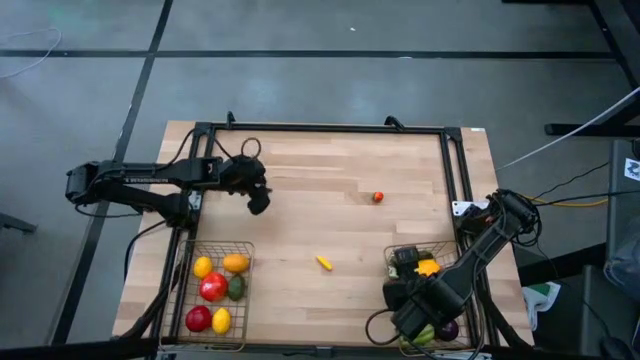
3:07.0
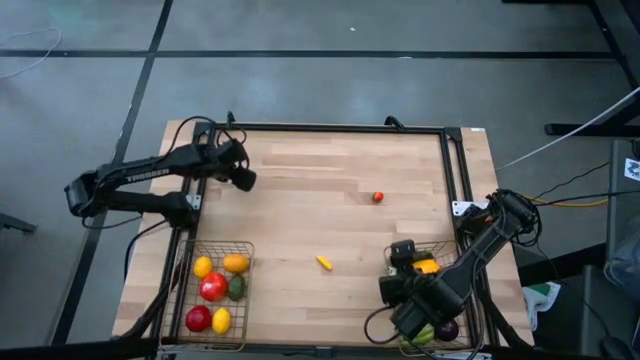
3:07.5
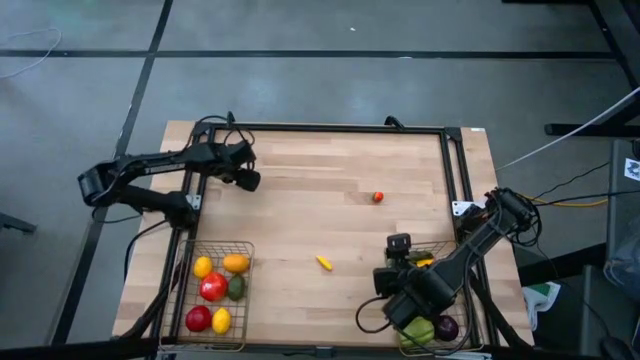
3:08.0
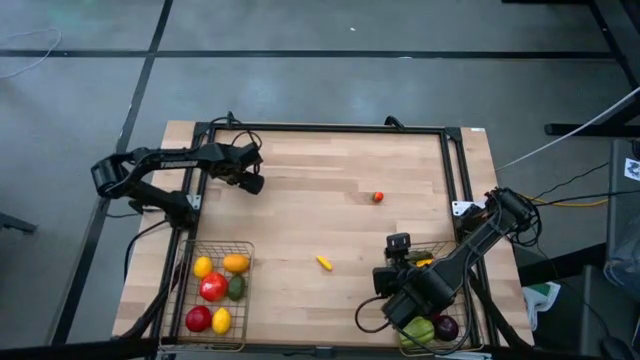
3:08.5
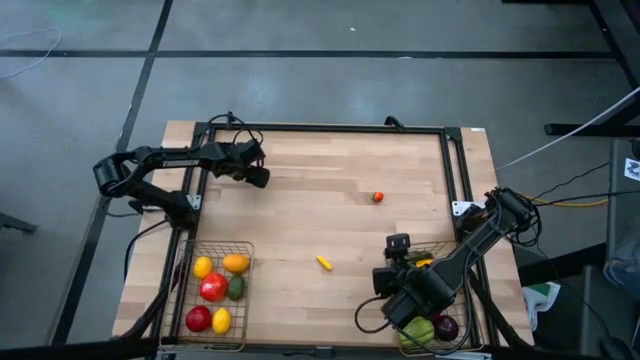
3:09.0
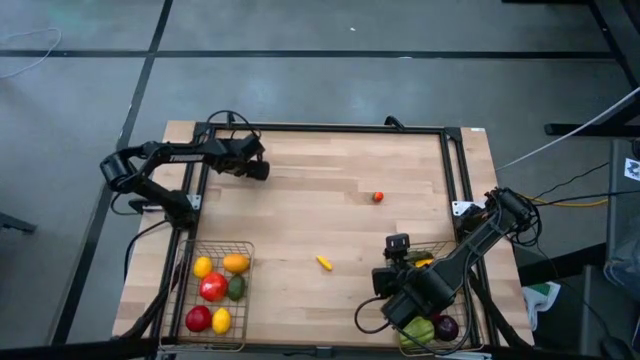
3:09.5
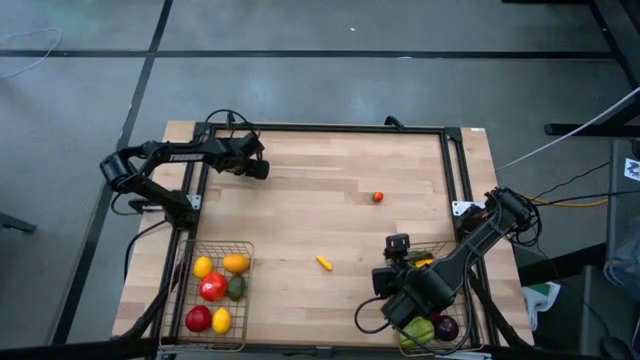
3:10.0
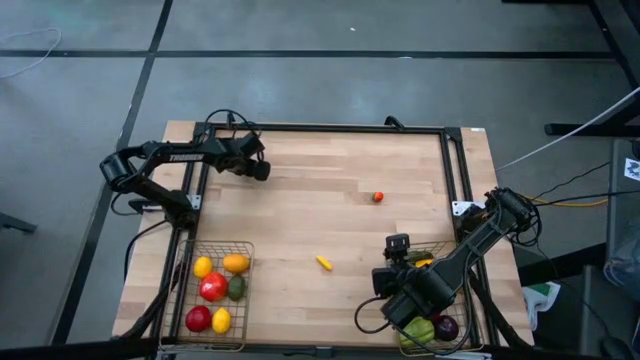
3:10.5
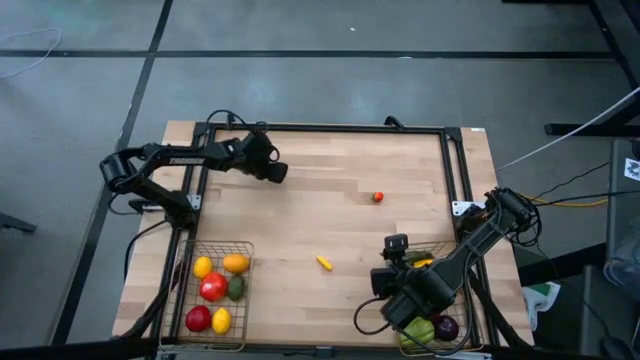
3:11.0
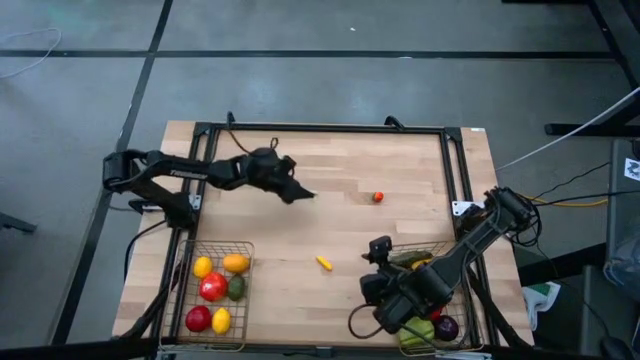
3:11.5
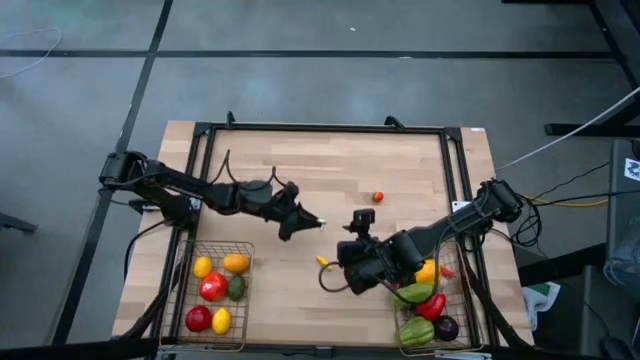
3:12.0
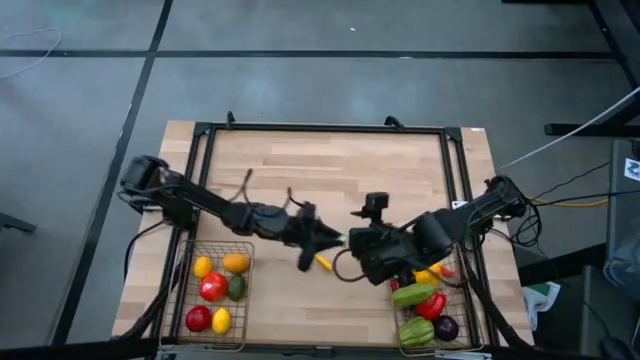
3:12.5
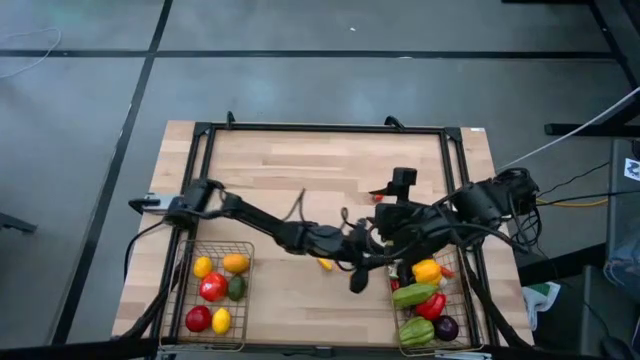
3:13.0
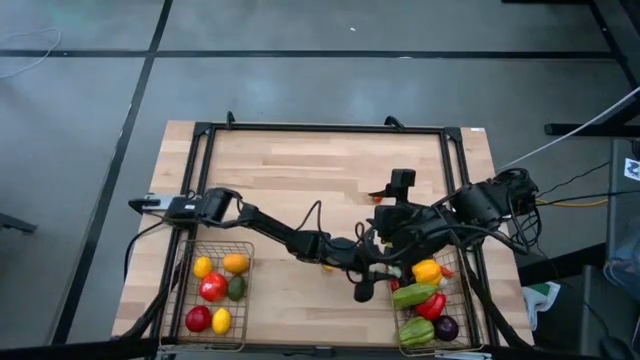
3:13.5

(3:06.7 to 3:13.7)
Task: Sort produce into baskets
Put the green mushroom into the right wire basket

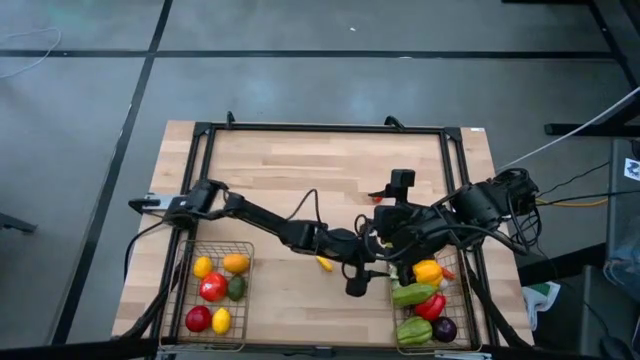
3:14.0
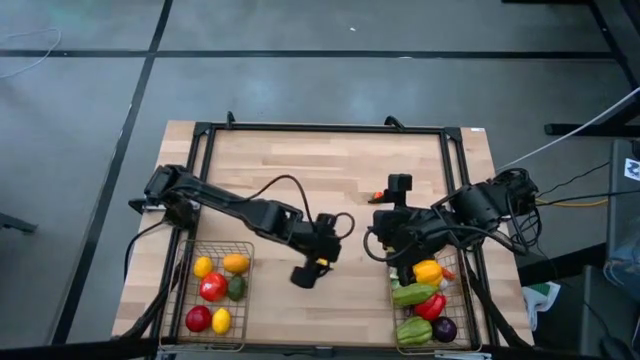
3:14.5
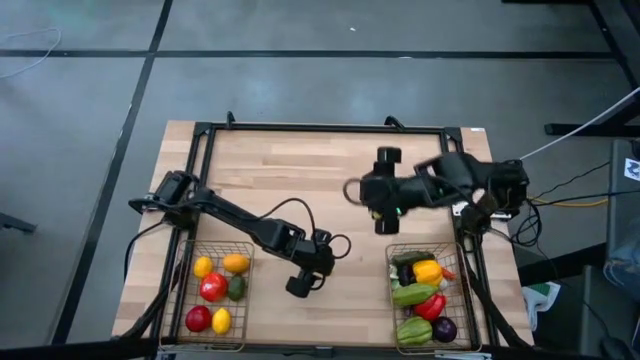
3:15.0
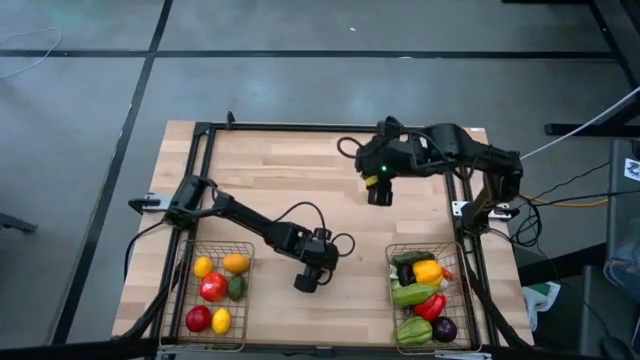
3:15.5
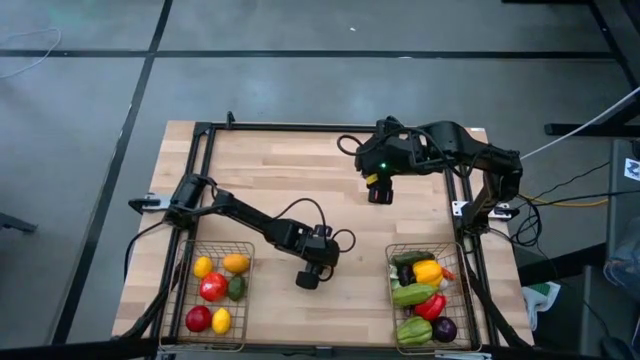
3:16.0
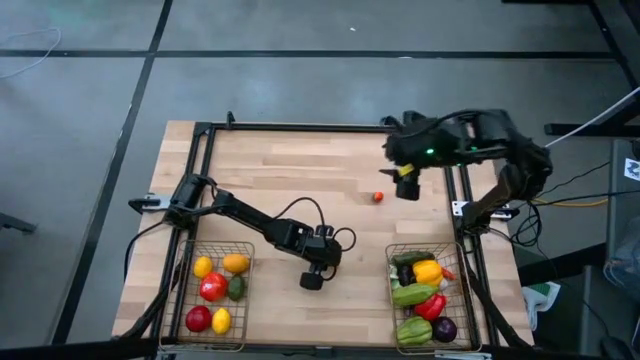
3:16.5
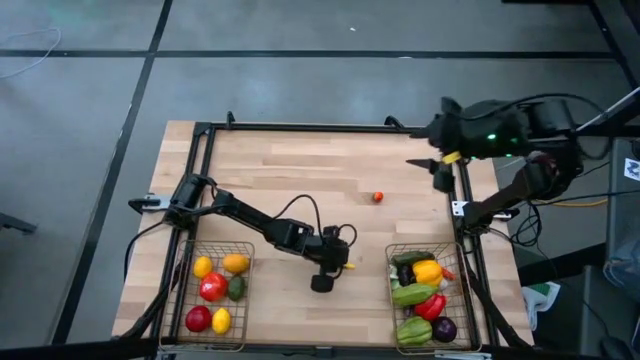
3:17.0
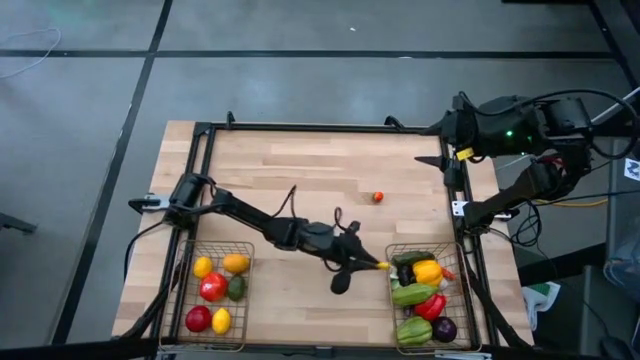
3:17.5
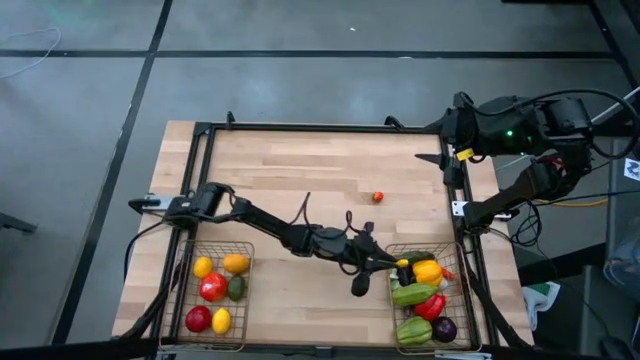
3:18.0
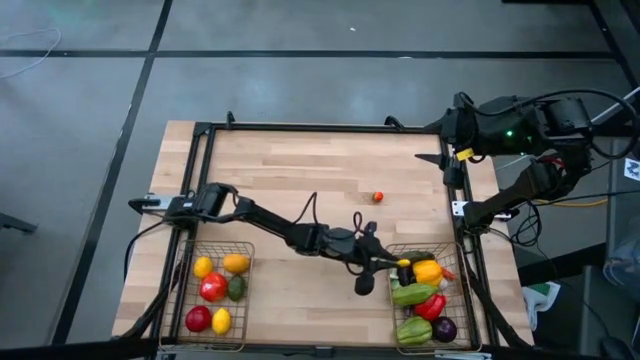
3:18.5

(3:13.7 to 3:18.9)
Put the yellow chilli pepper into the right wire basket

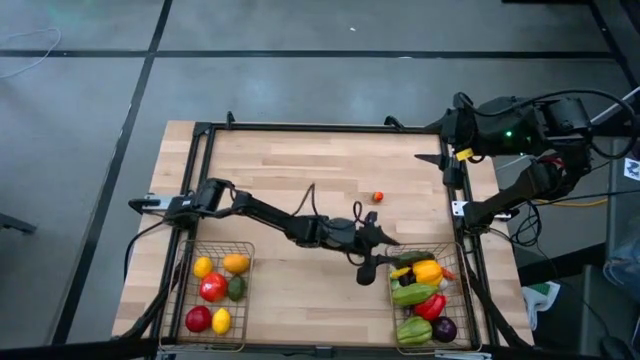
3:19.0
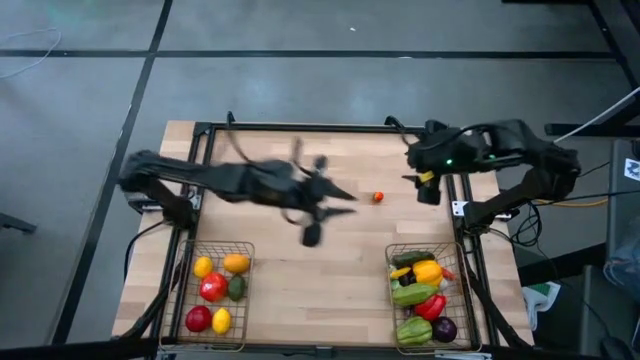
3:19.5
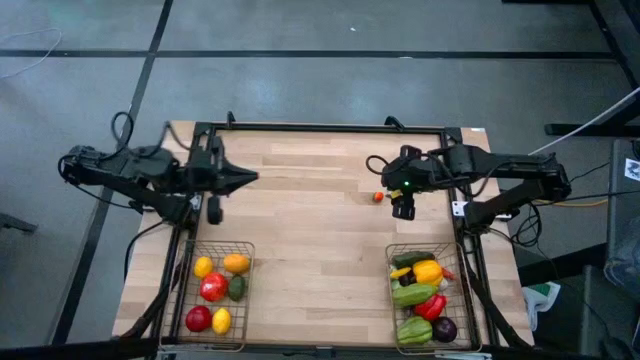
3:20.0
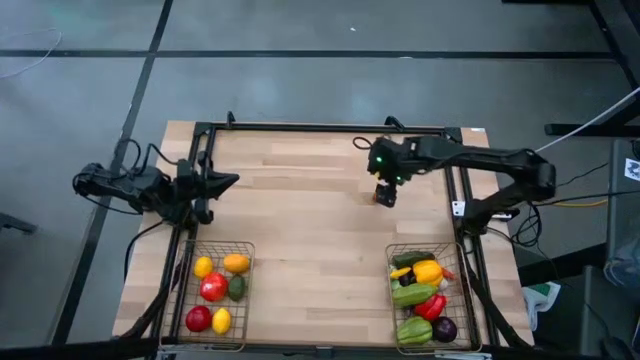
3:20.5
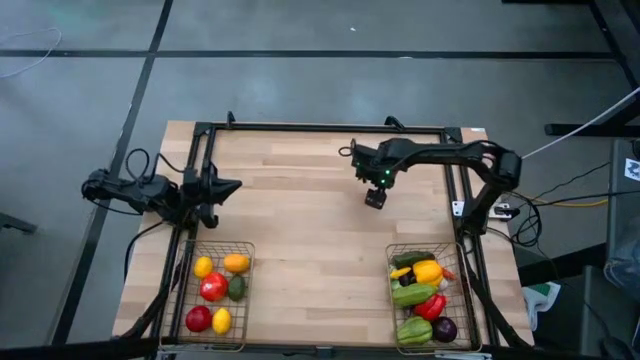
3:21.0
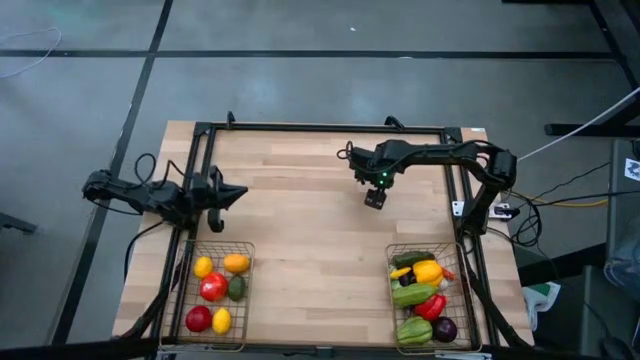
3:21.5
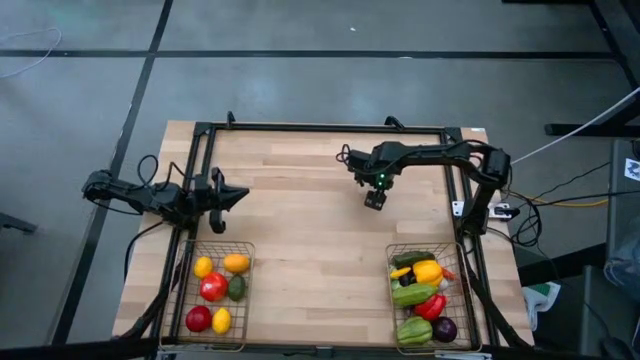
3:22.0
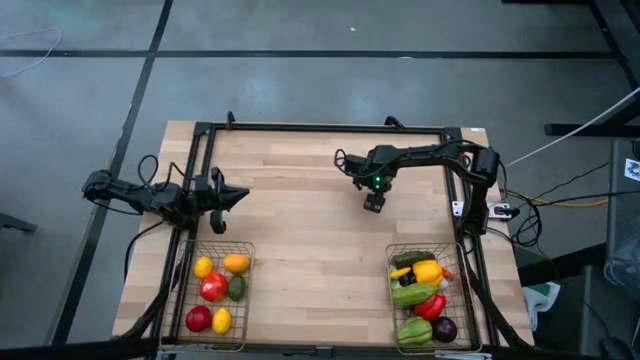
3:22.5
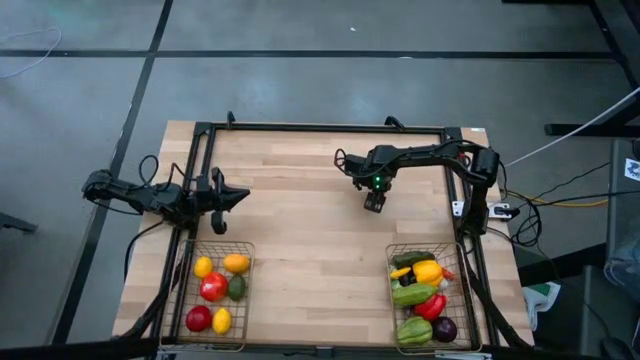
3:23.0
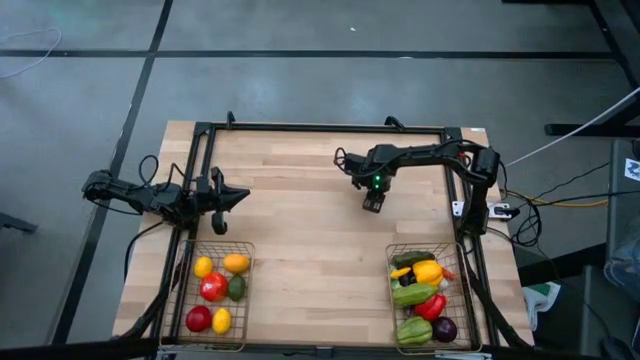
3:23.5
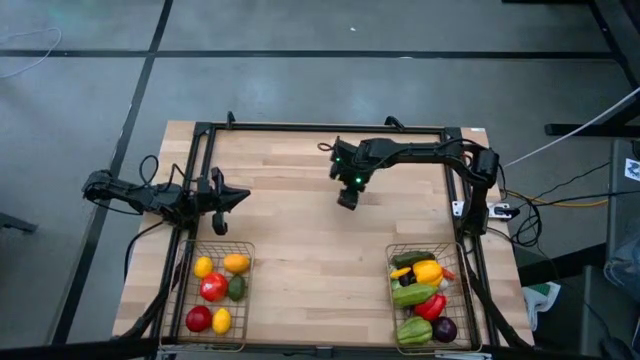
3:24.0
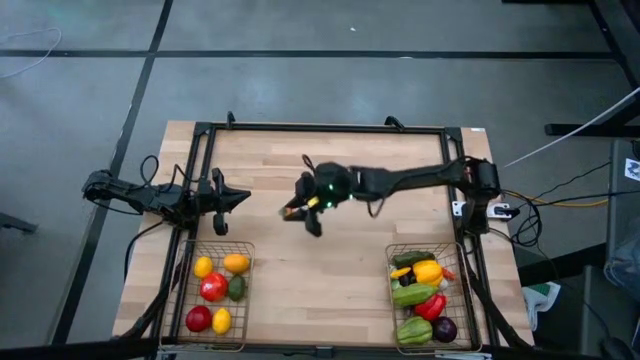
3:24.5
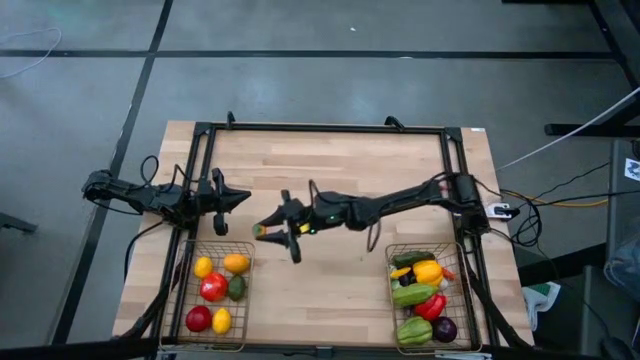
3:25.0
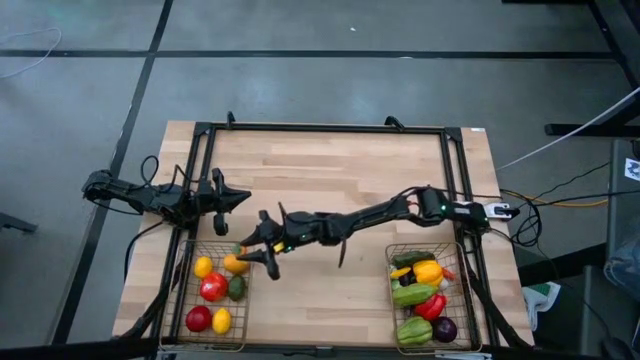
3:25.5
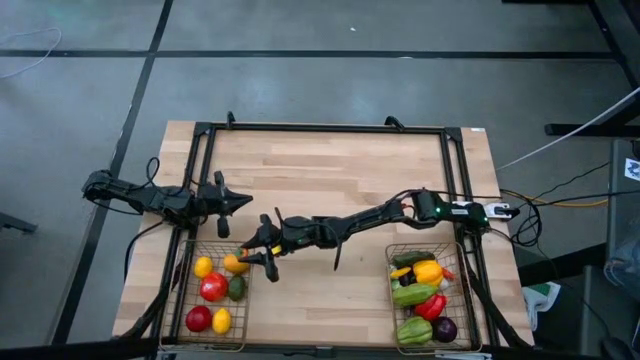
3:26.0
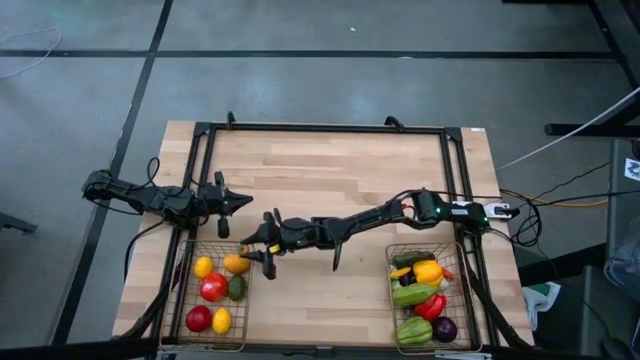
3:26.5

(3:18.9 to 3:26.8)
Put the red persimmon into the left wire basket
